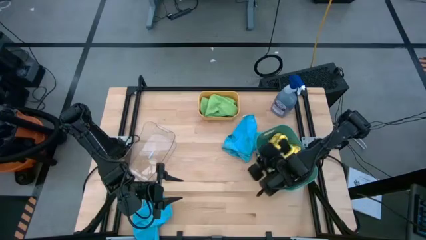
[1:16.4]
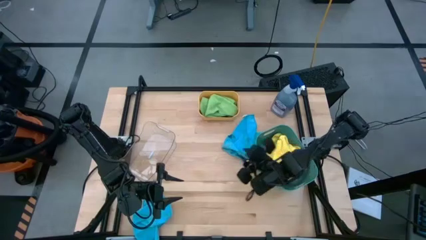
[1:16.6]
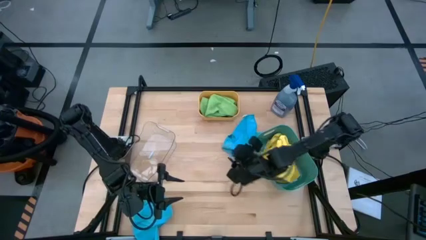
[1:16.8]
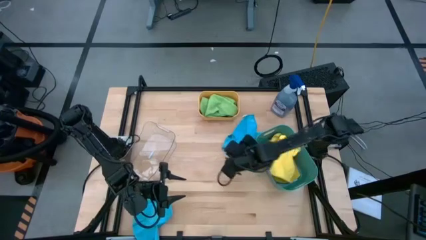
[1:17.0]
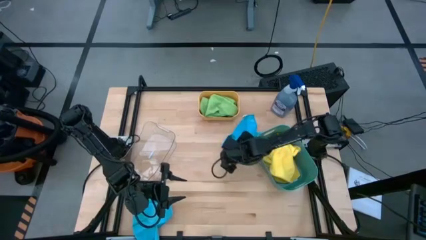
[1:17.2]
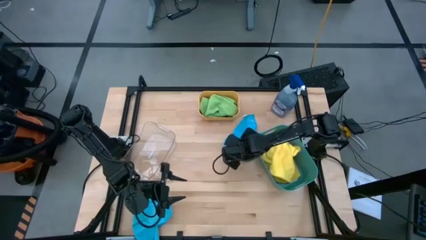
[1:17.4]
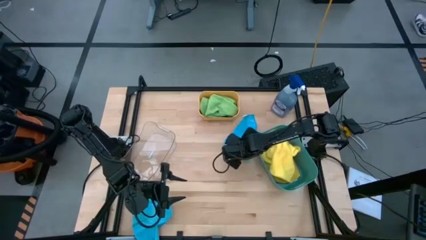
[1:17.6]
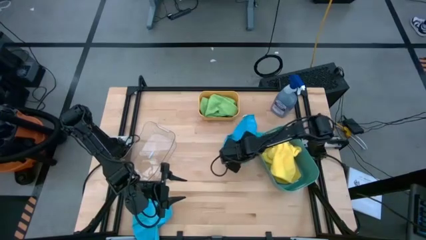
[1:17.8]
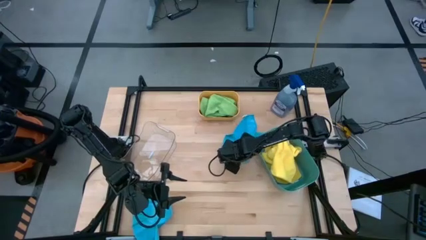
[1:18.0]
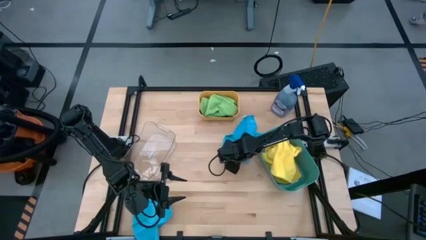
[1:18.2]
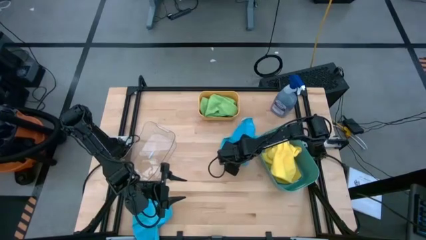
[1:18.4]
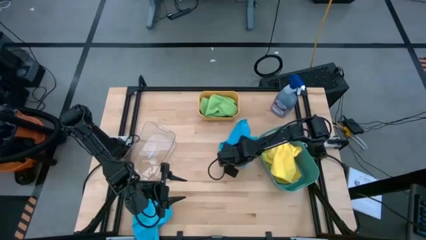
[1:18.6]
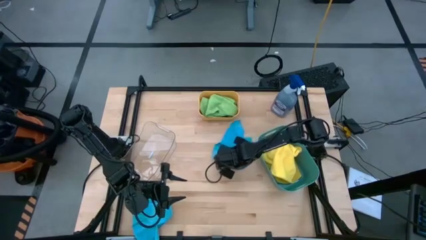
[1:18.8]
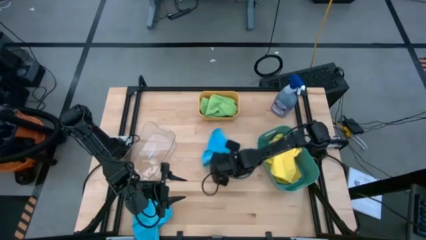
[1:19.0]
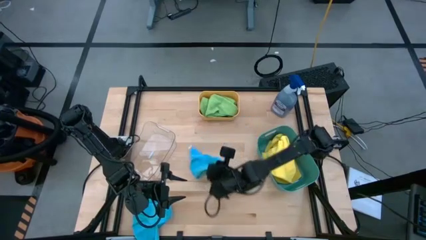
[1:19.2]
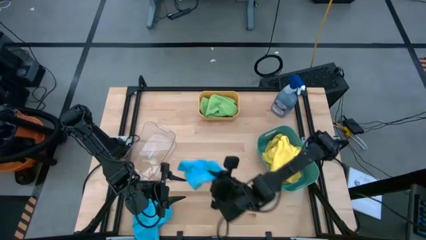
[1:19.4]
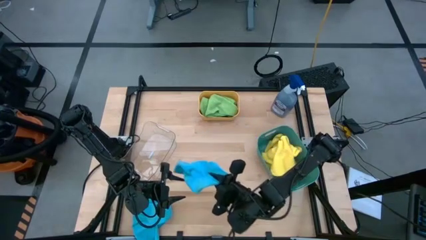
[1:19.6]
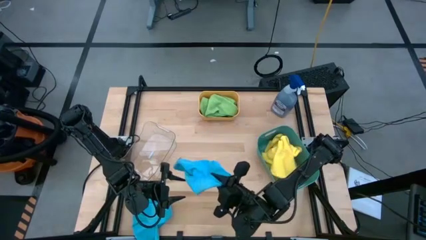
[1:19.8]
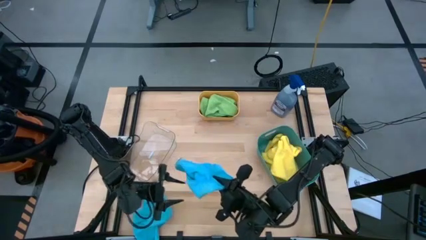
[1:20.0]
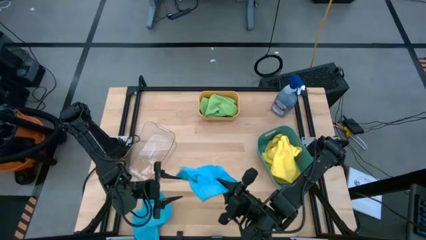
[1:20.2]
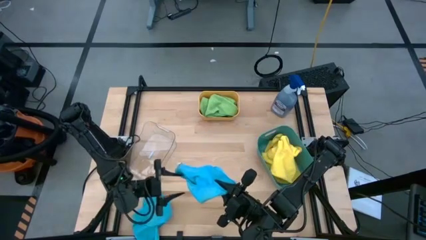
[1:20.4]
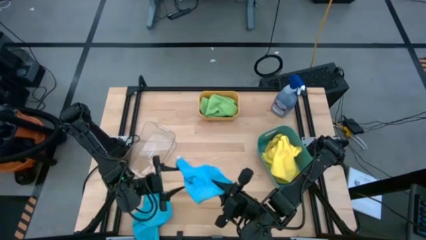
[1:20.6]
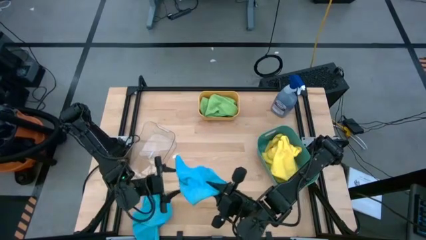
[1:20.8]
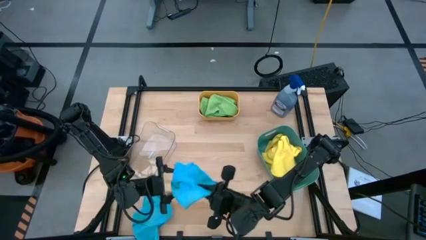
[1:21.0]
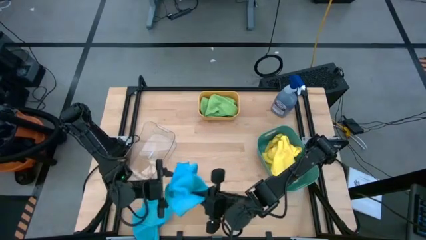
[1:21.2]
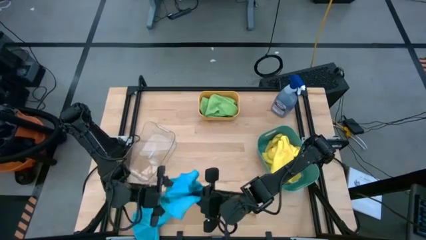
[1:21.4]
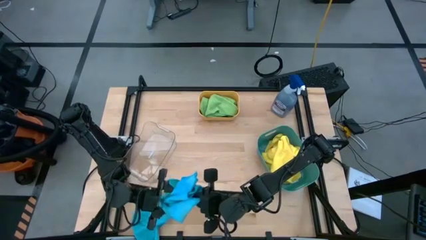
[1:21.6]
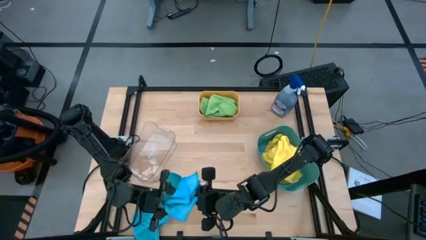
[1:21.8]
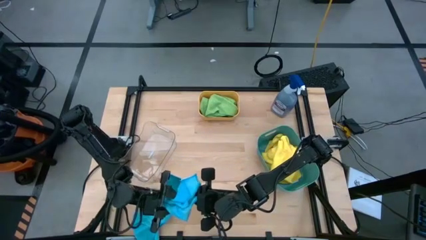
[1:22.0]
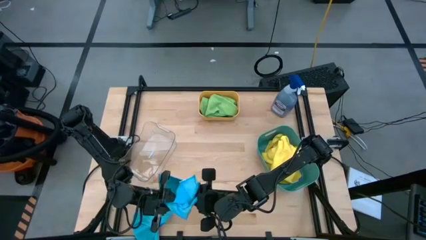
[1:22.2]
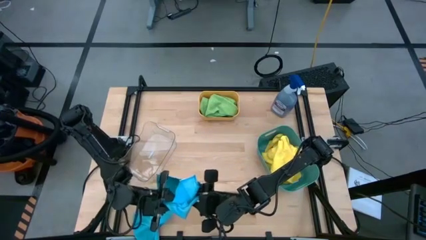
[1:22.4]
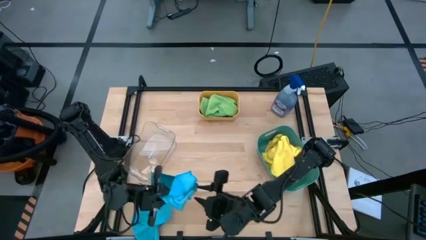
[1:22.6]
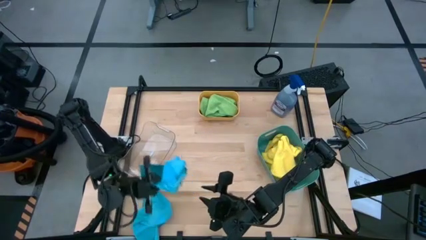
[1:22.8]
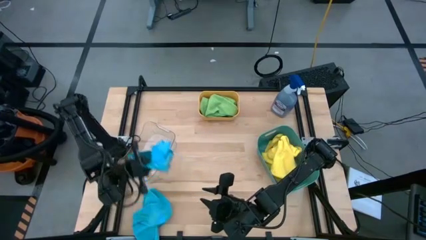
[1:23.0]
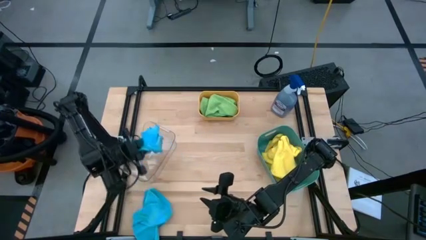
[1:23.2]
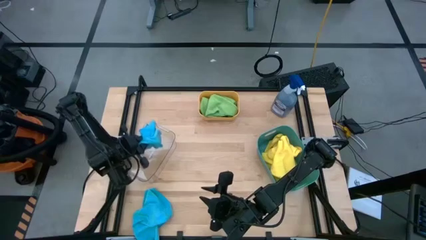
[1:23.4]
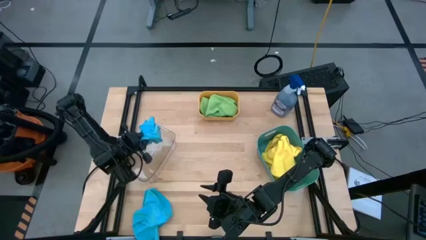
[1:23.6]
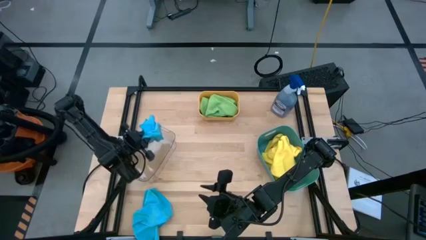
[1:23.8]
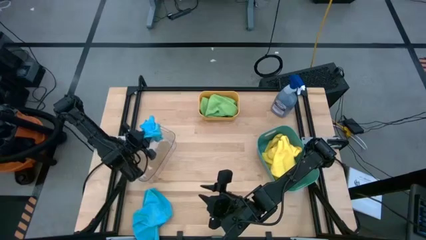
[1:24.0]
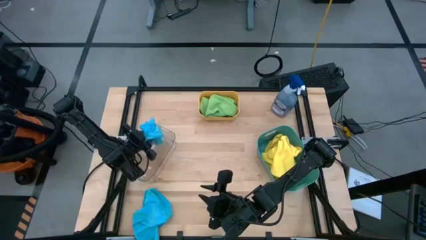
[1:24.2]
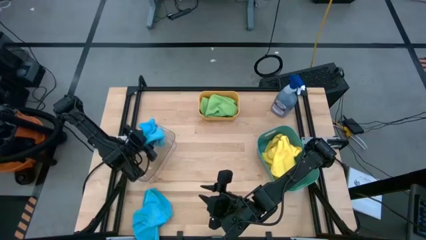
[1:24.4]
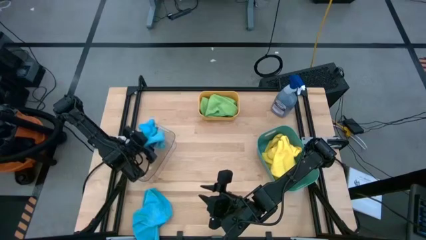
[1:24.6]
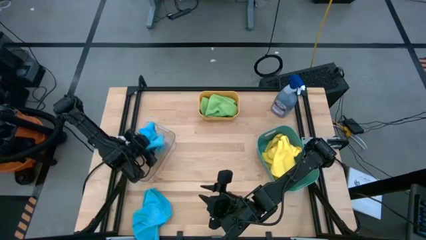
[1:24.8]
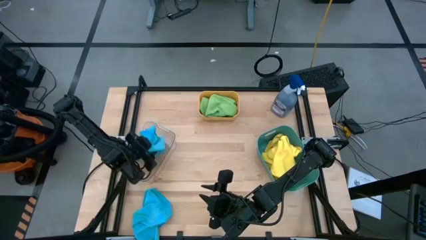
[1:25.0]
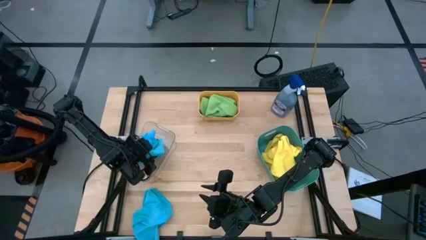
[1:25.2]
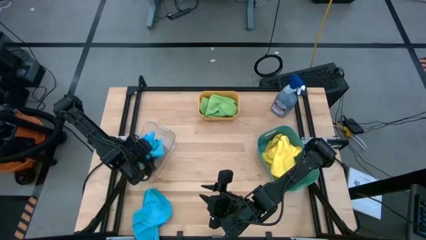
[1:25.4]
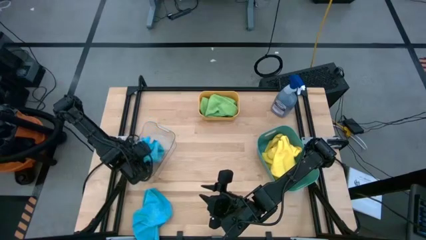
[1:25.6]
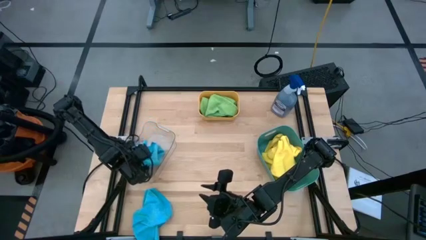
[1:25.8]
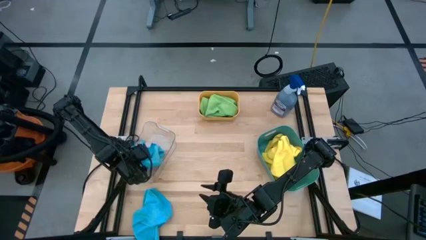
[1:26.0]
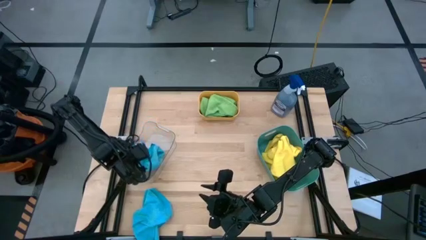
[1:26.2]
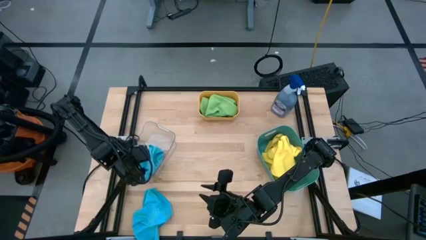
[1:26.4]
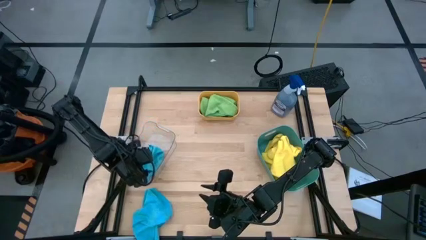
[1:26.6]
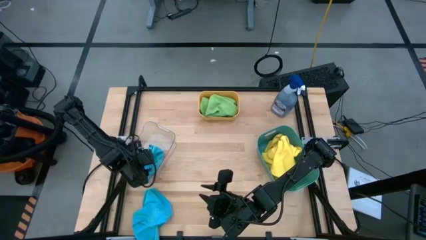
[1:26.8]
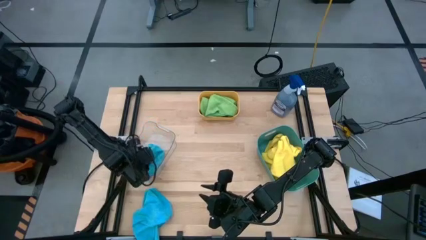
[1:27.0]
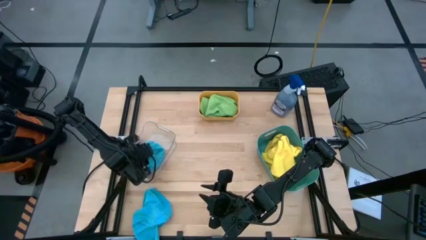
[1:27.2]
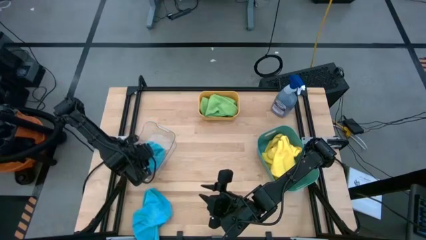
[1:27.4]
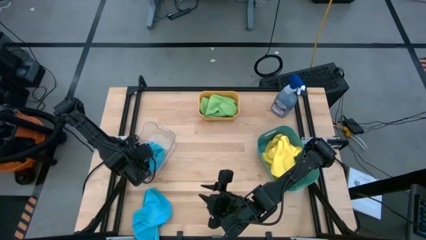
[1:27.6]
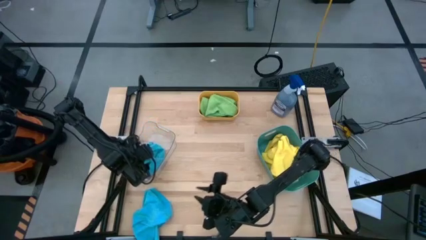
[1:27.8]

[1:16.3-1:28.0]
Task: Sort microfiber towel by color & place in baskets
Put the top blue microfiber cloth into the transparent bin
